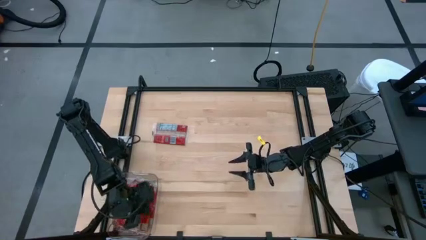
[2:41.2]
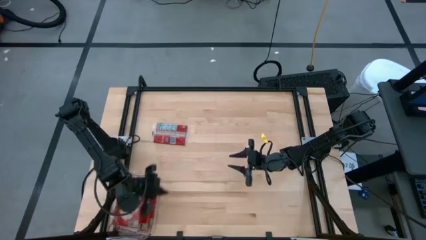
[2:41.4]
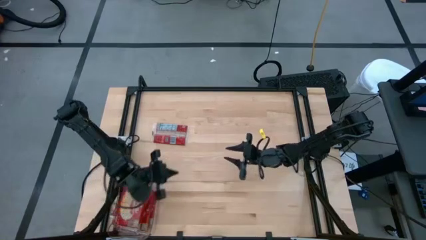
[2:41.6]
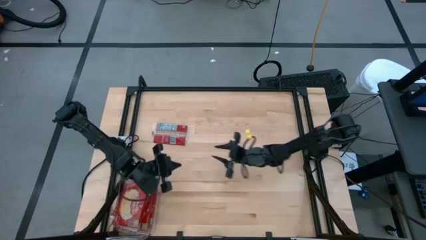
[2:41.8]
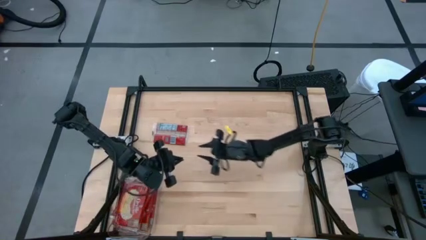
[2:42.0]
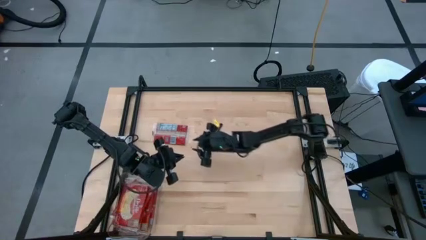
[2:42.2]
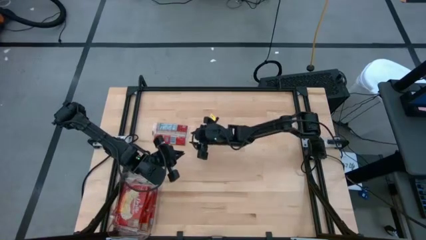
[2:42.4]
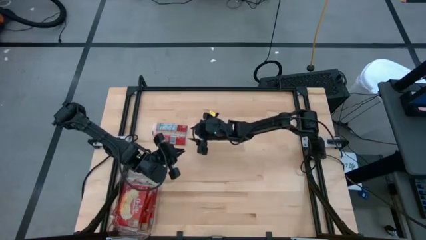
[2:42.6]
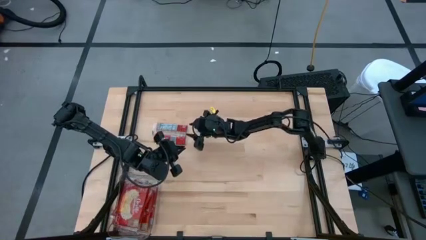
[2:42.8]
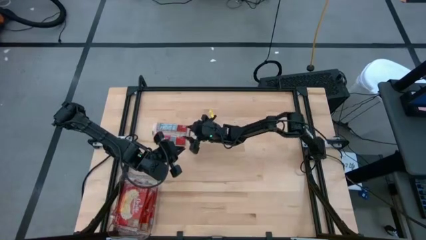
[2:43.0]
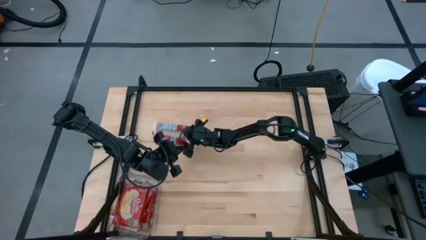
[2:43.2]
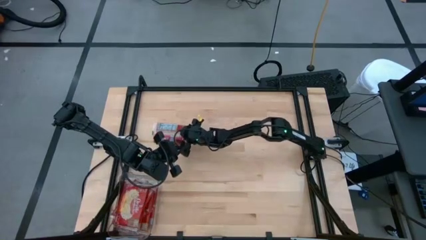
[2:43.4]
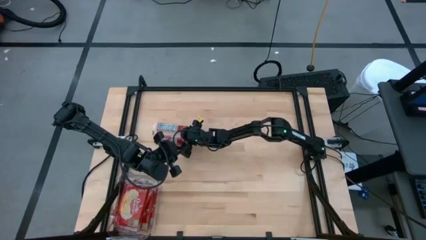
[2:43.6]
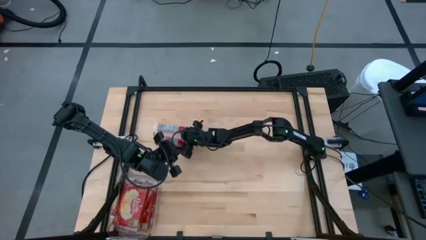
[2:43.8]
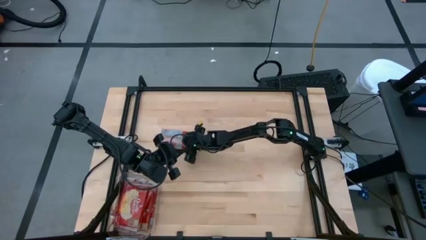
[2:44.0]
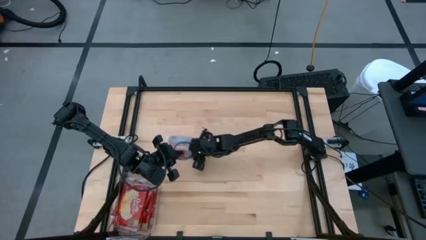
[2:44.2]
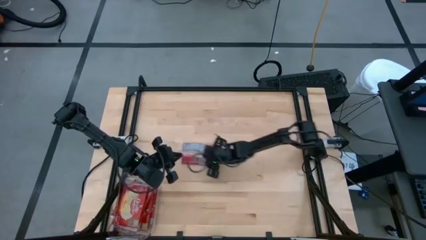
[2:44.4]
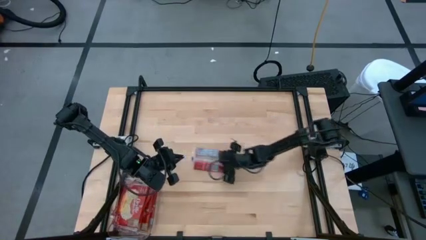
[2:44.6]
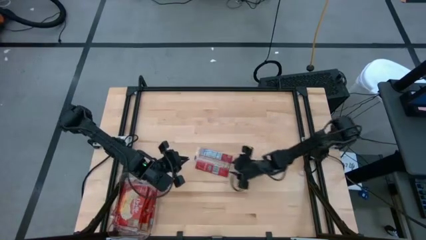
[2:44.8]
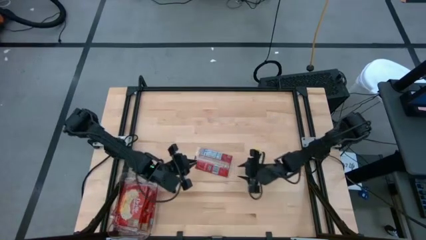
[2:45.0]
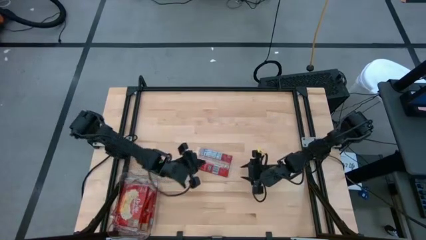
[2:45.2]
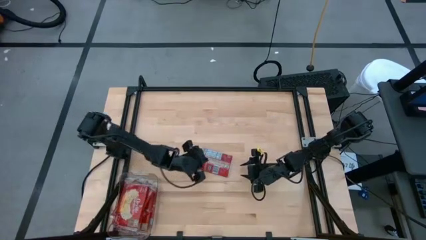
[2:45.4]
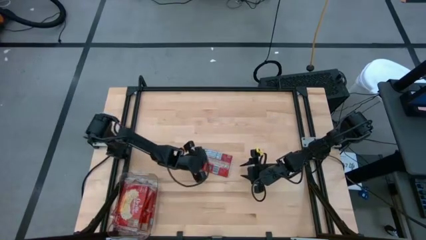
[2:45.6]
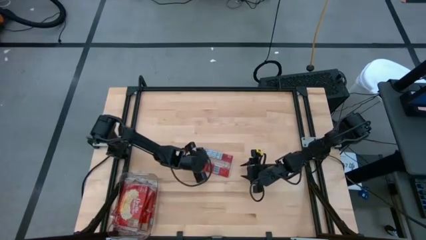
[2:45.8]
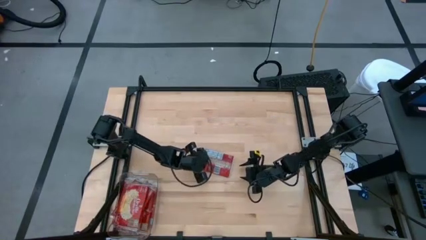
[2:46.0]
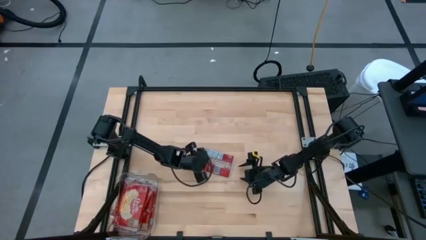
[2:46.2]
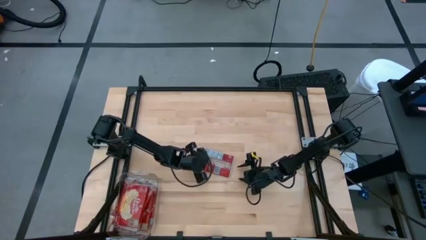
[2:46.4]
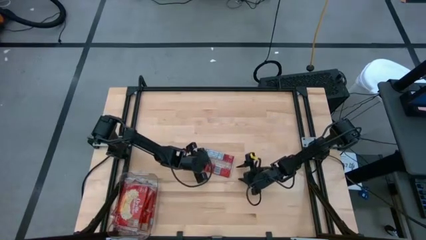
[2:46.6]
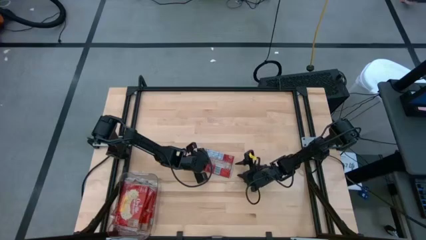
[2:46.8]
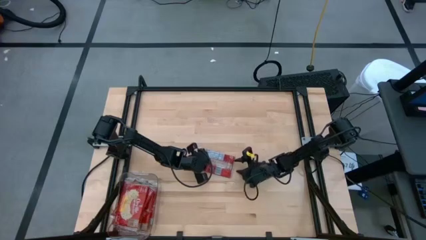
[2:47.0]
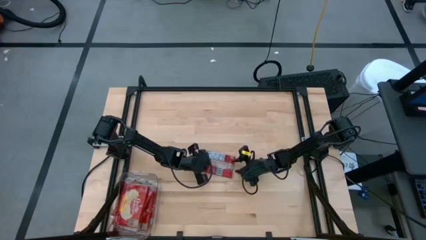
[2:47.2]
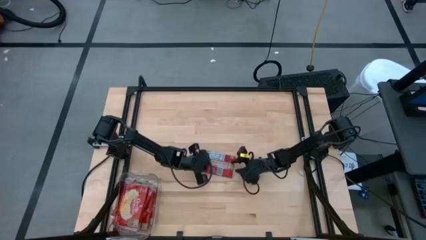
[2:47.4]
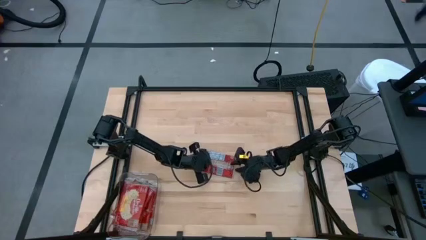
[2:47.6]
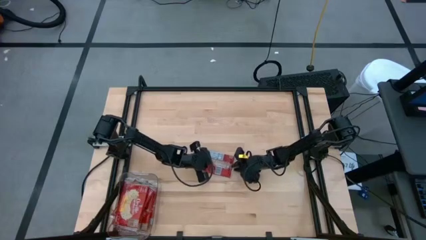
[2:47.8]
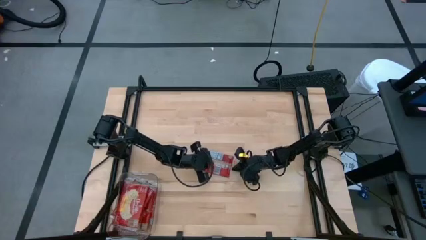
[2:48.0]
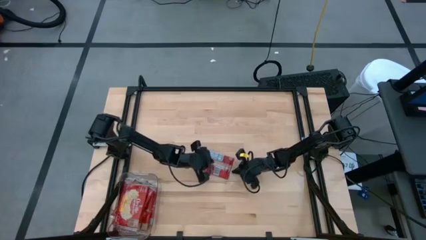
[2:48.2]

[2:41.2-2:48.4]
Task: Sort popcorn bags into baskets
Put the popcorn bag into the transparent bin

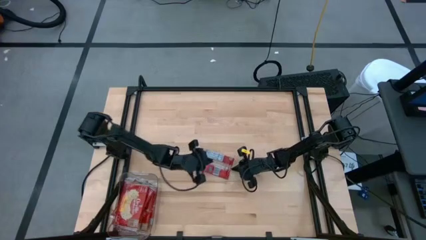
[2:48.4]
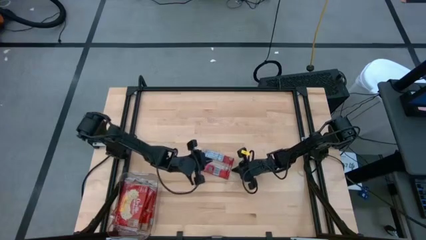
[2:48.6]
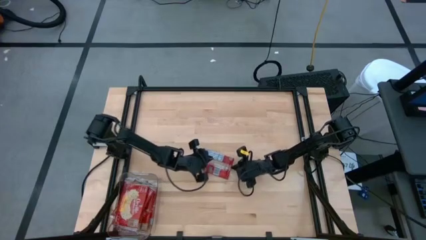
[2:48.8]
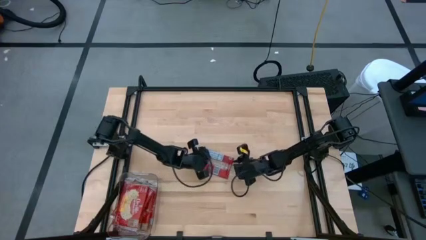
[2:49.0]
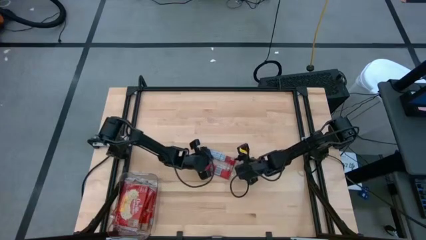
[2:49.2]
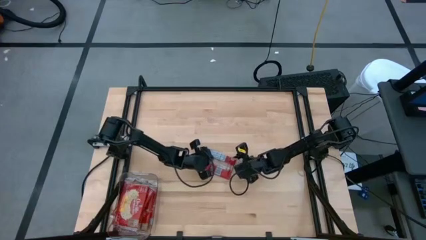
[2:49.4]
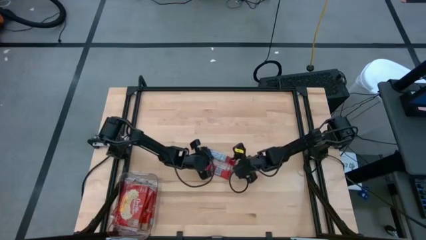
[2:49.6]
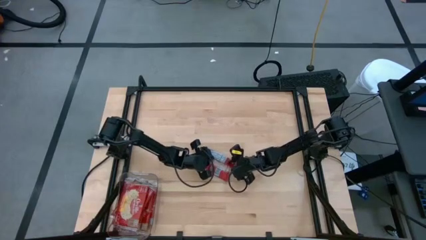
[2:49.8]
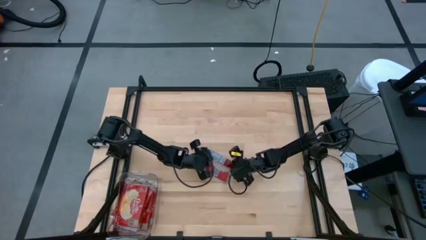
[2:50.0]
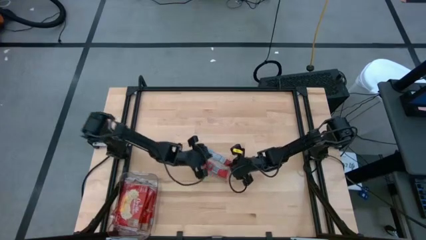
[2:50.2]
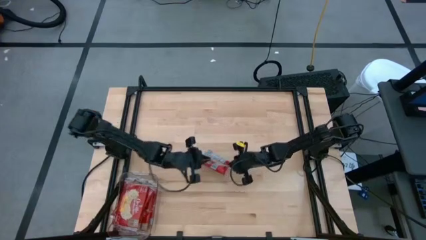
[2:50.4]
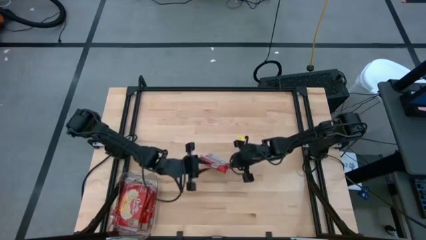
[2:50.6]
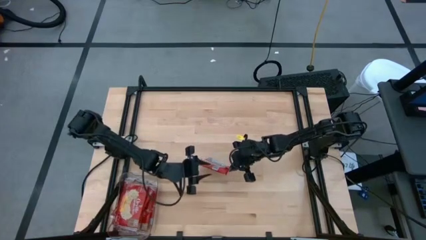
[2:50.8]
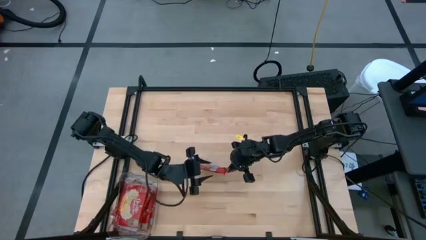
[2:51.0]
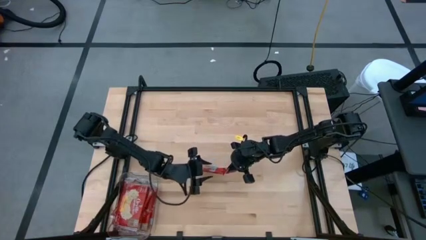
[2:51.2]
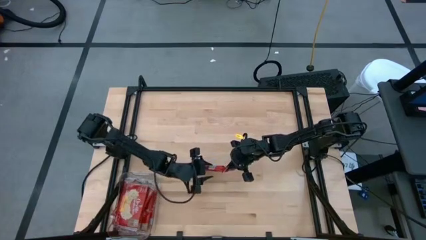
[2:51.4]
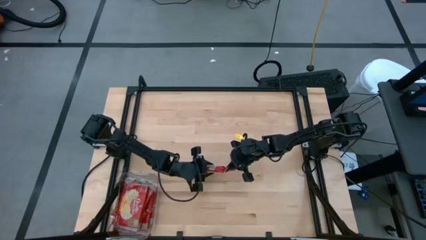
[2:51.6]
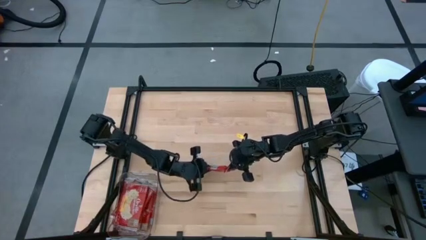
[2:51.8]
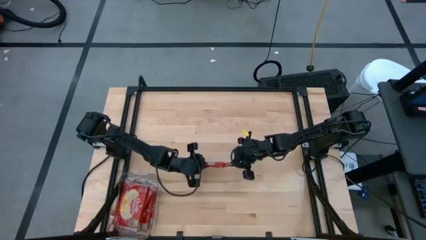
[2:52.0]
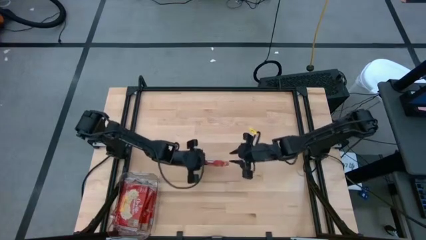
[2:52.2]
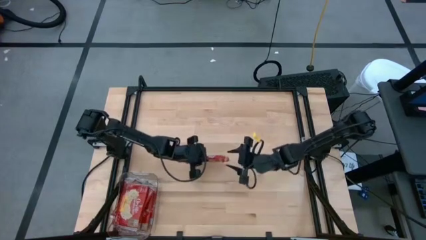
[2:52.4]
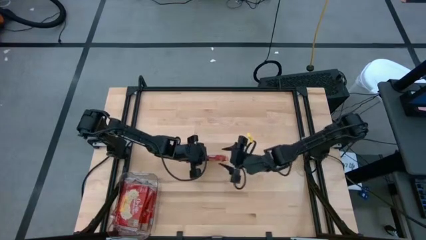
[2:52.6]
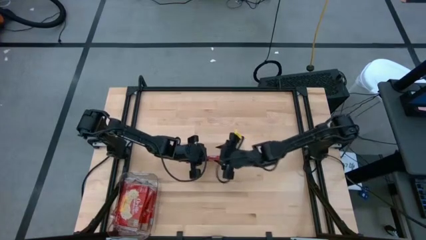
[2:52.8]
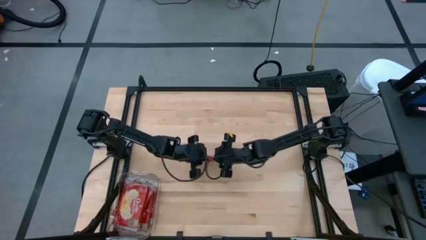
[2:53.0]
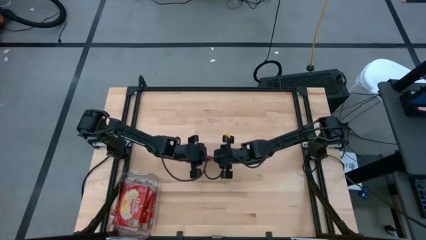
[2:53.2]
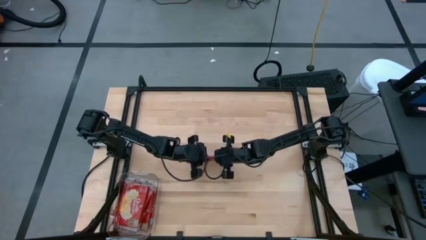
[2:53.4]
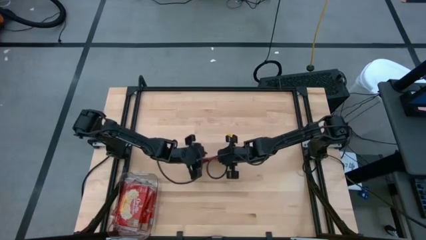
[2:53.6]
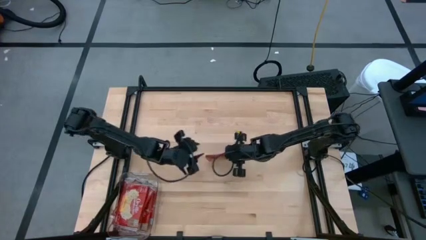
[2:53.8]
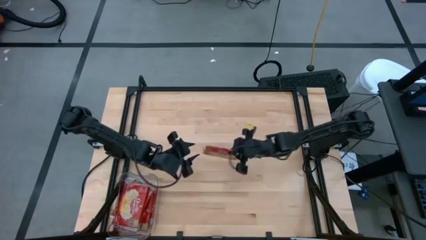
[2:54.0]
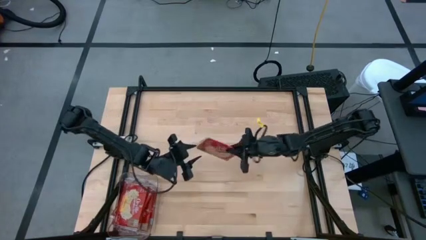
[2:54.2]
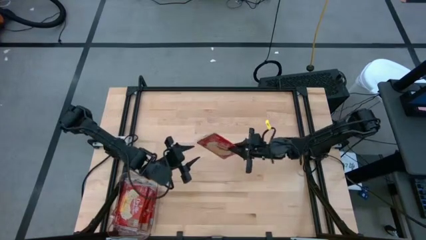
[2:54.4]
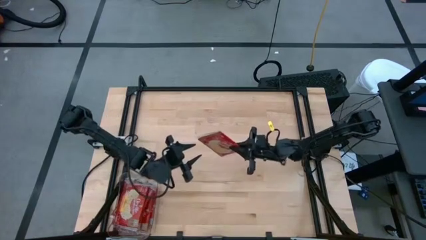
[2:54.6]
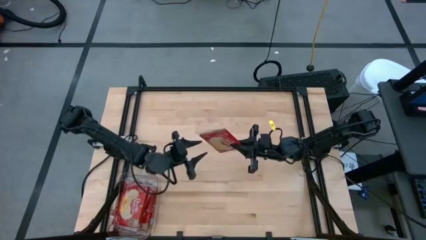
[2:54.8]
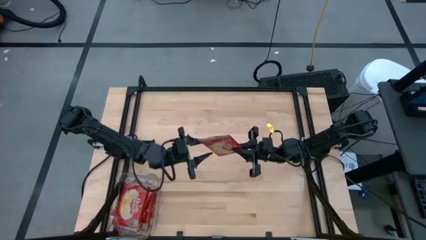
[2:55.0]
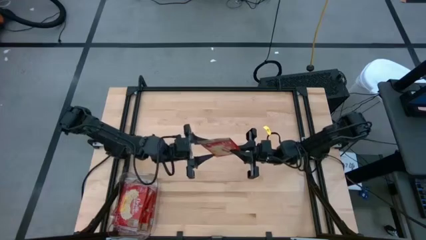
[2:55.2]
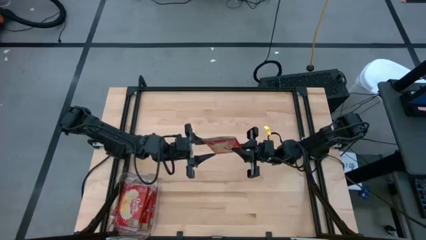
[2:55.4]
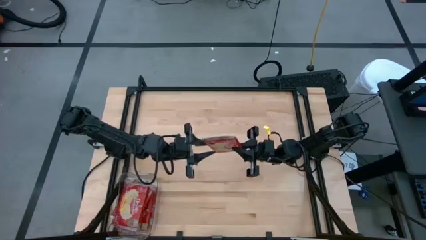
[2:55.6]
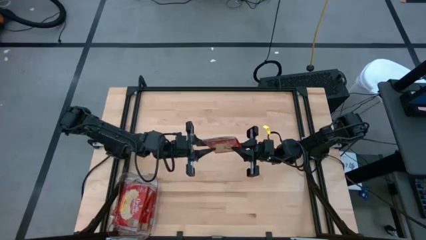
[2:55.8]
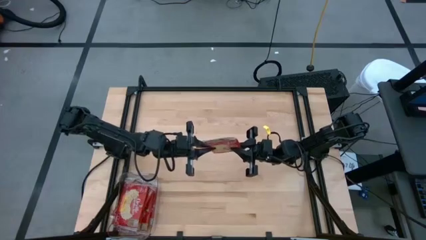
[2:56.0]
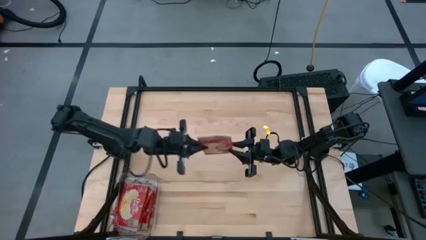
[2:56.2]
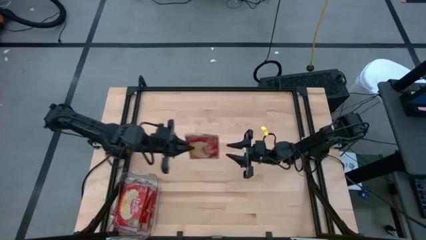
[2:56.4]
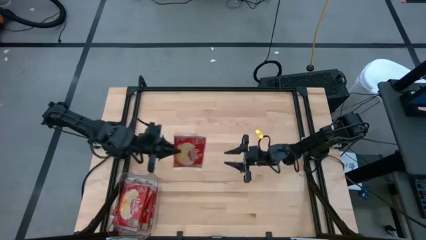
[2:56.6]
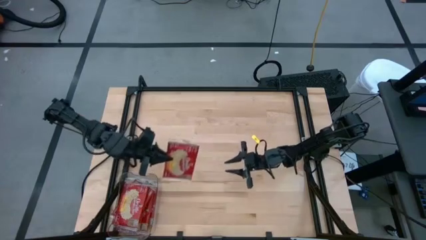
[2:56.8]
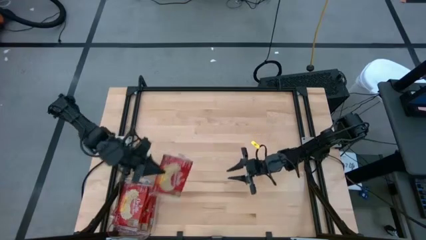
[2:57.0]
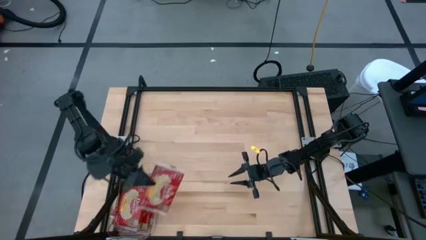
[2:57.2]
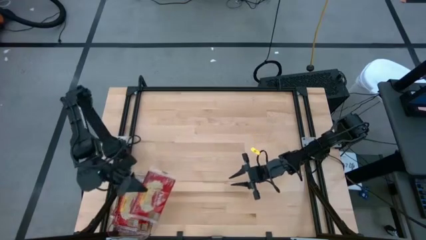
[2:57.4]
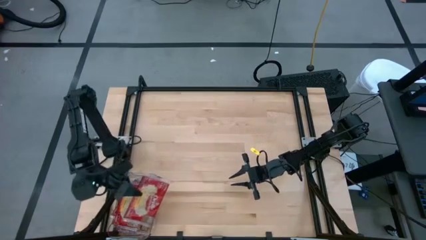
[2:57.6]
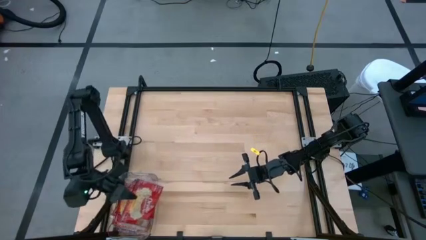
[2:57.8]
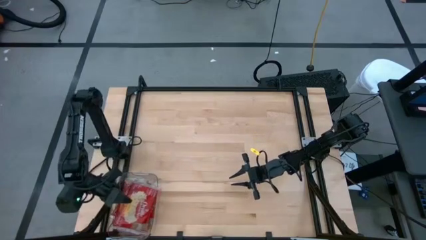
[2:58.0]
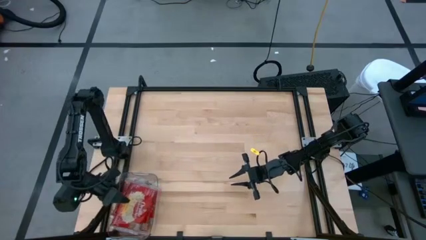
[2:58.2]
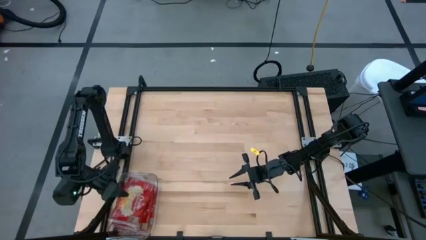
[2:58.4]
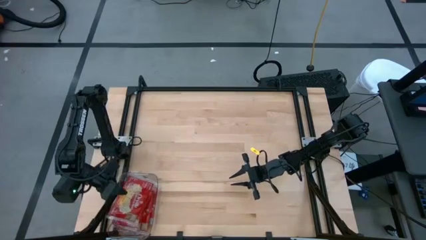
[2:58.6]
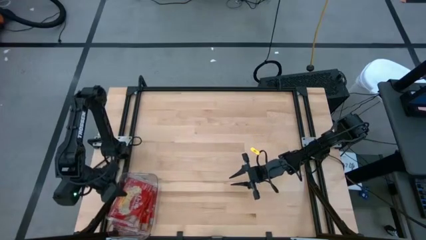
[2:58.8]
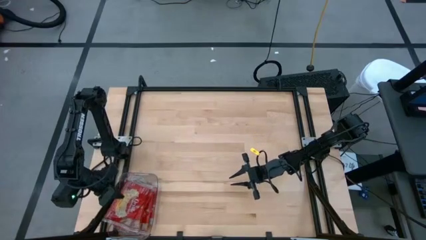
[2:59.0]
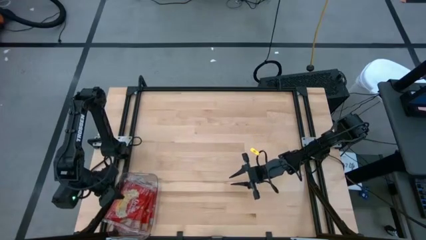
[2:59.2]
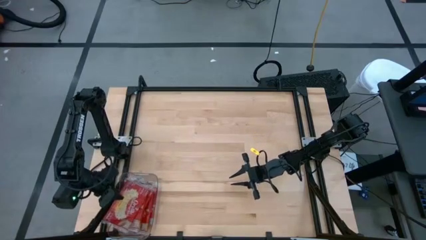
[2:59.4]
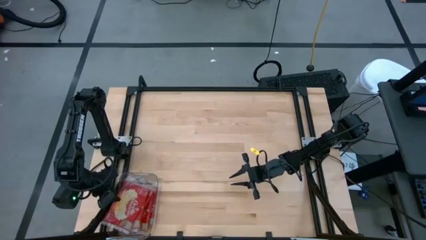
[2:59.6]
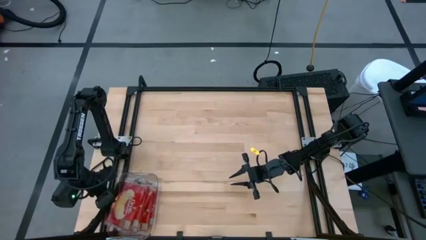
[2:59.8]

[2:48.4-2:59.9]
Put the popcorn bag into the transparent bin
